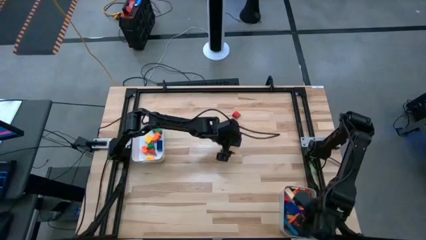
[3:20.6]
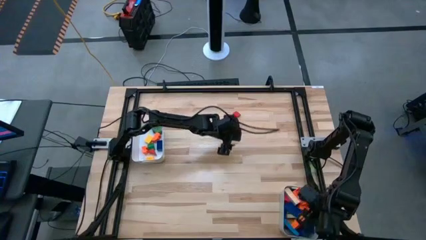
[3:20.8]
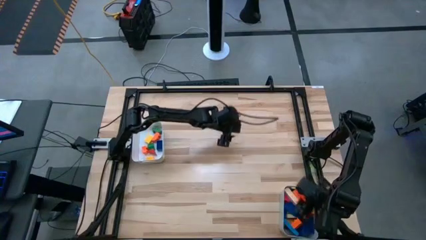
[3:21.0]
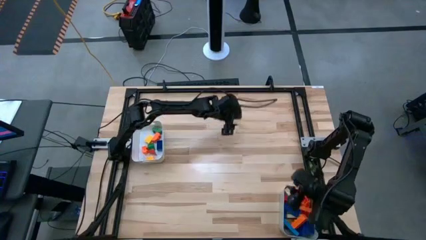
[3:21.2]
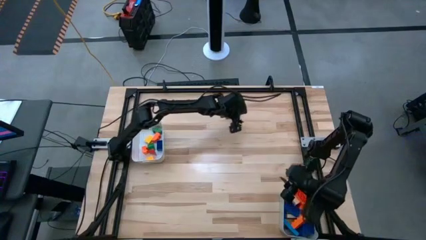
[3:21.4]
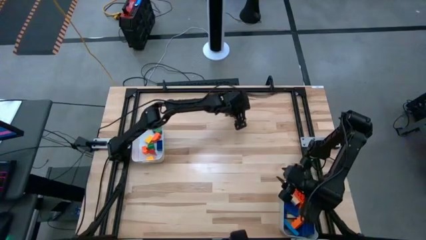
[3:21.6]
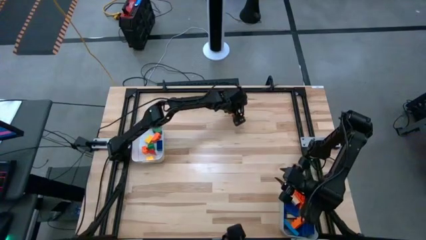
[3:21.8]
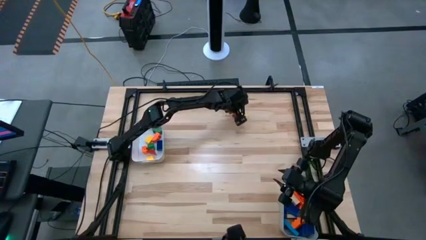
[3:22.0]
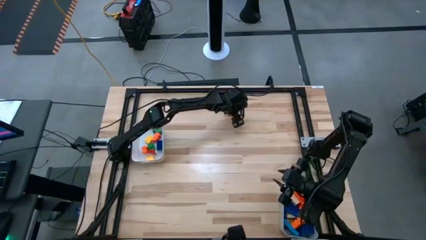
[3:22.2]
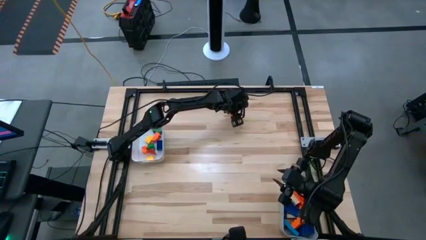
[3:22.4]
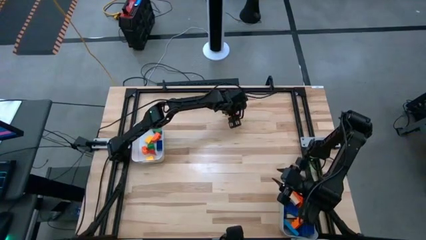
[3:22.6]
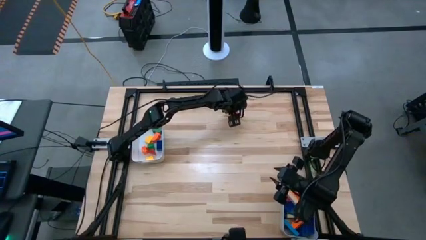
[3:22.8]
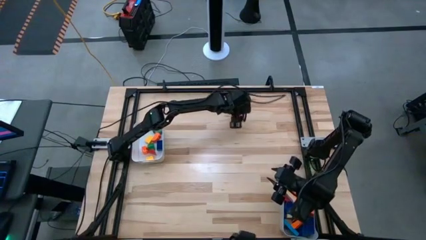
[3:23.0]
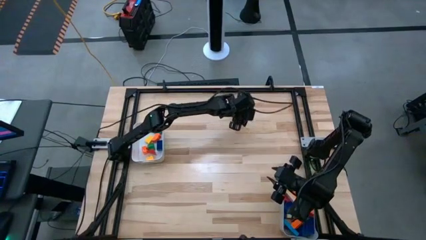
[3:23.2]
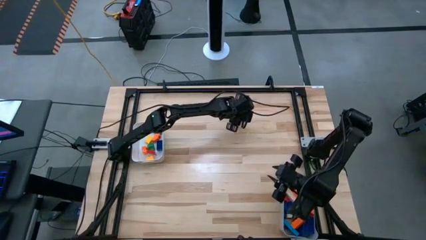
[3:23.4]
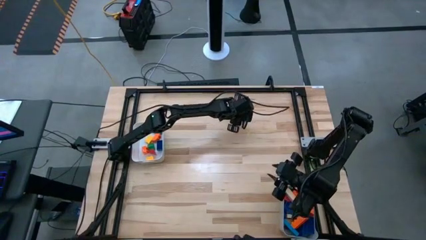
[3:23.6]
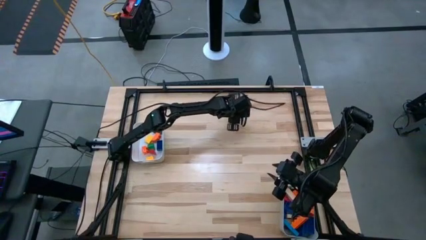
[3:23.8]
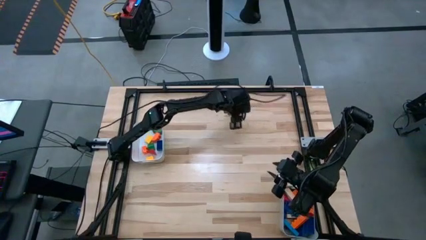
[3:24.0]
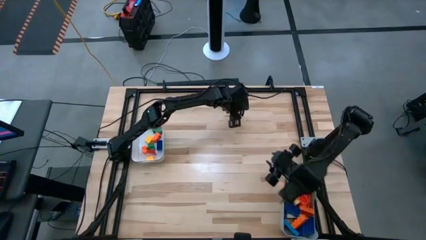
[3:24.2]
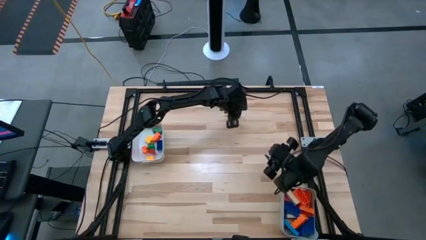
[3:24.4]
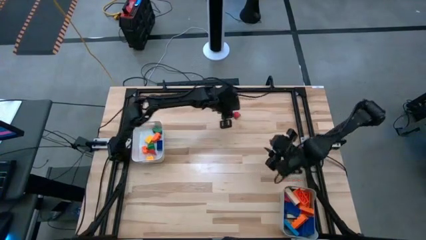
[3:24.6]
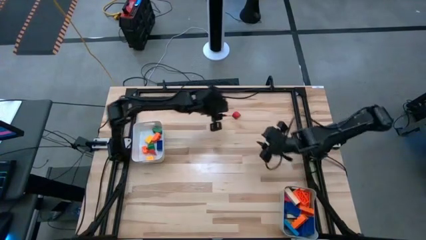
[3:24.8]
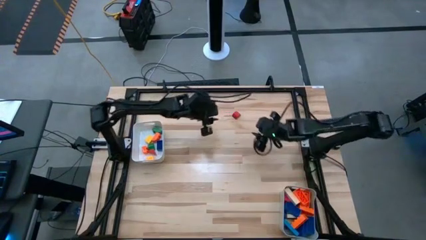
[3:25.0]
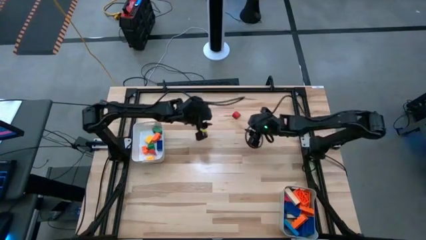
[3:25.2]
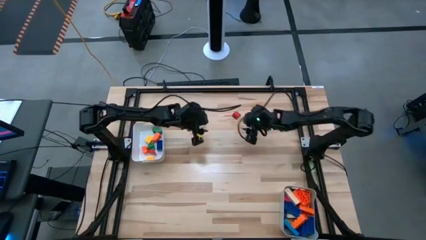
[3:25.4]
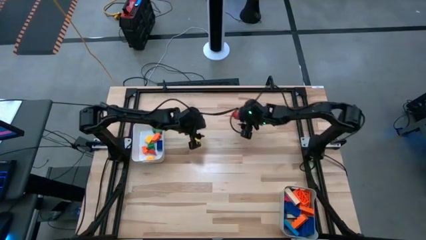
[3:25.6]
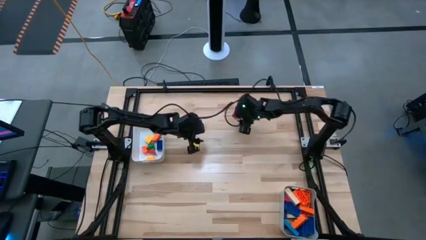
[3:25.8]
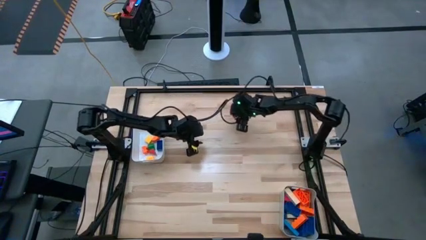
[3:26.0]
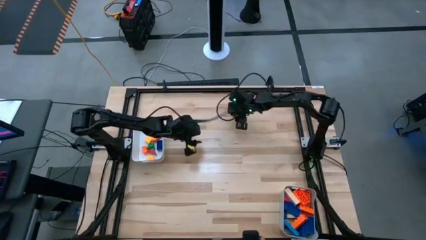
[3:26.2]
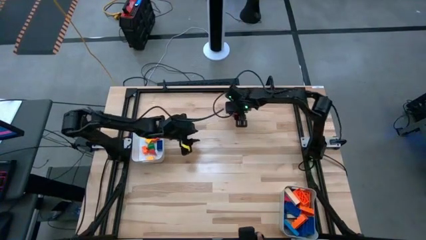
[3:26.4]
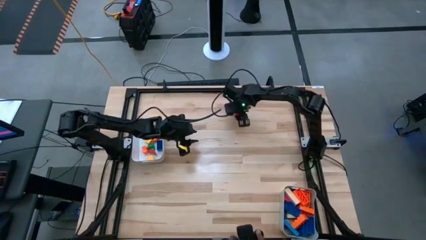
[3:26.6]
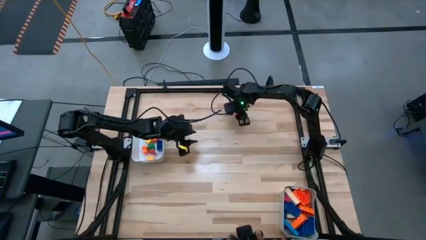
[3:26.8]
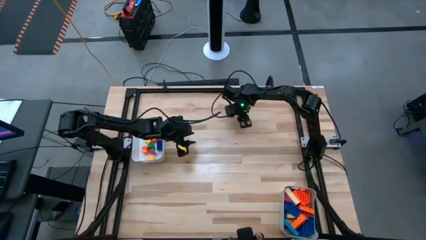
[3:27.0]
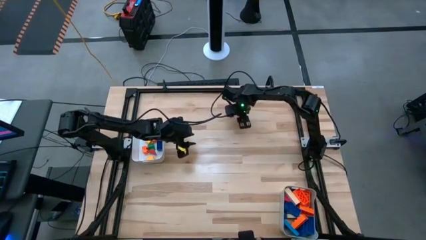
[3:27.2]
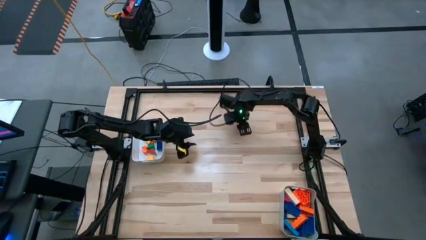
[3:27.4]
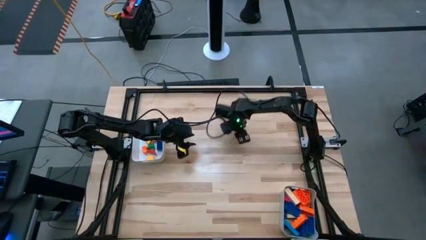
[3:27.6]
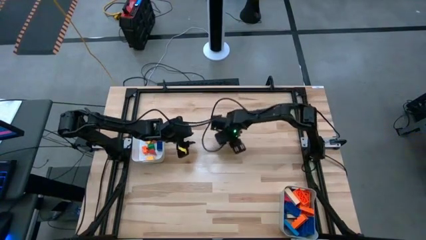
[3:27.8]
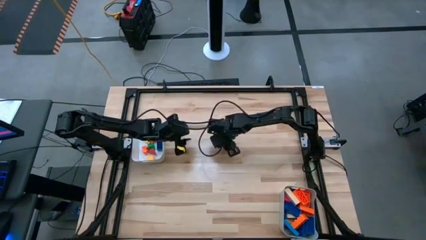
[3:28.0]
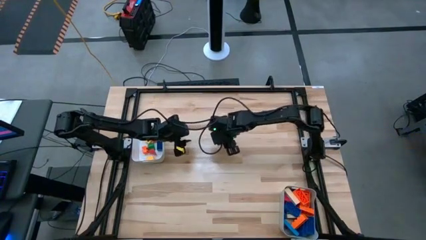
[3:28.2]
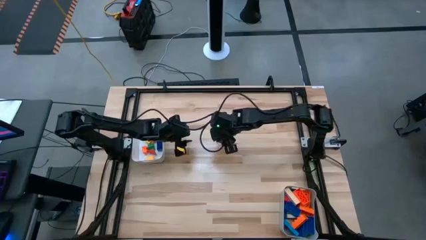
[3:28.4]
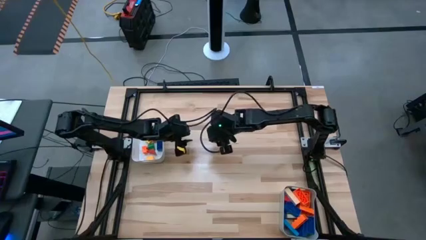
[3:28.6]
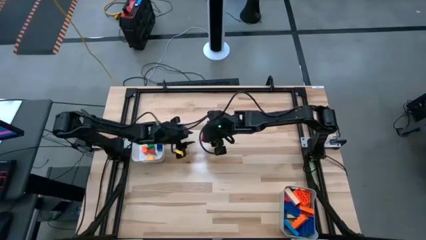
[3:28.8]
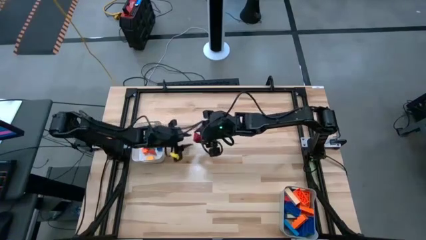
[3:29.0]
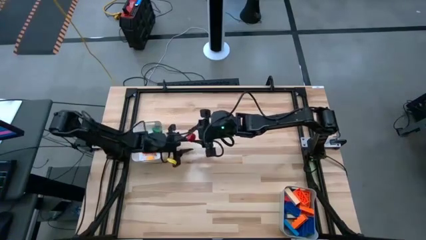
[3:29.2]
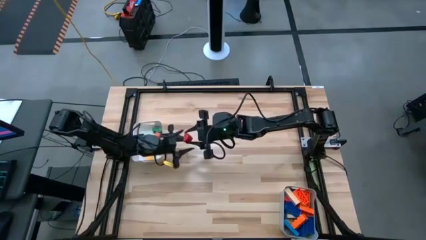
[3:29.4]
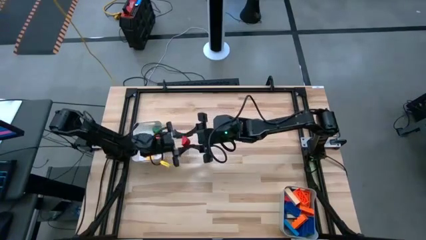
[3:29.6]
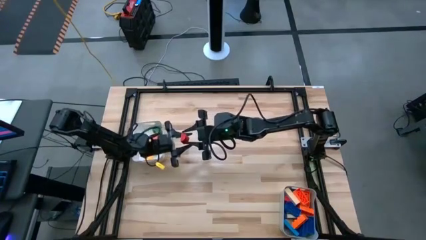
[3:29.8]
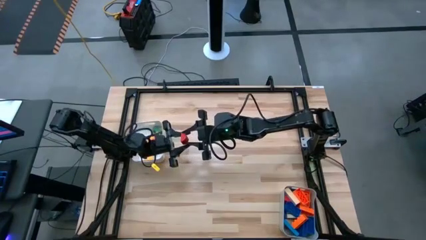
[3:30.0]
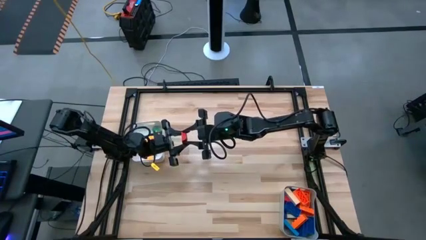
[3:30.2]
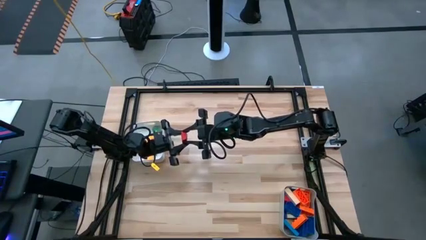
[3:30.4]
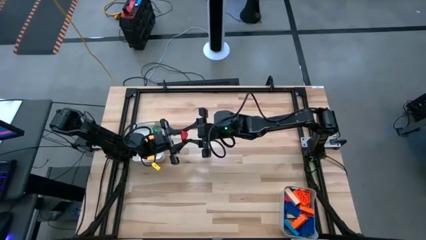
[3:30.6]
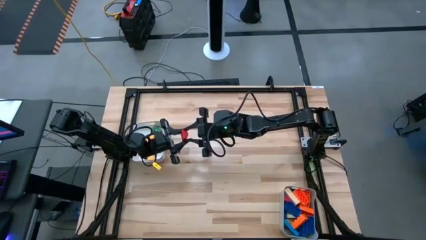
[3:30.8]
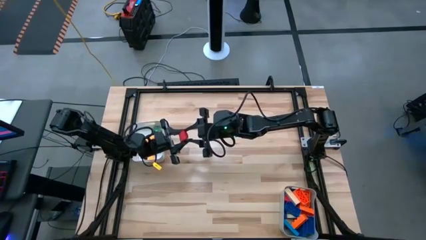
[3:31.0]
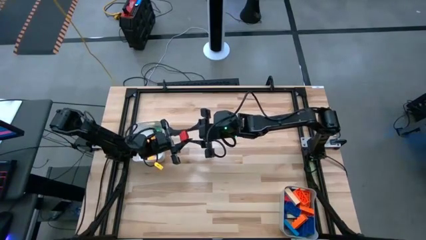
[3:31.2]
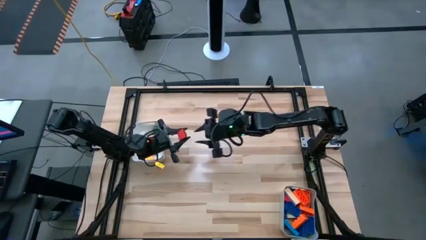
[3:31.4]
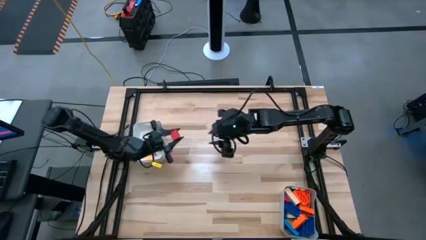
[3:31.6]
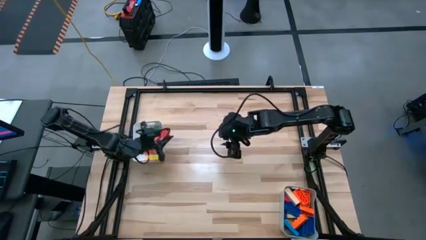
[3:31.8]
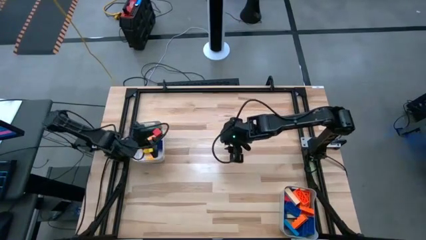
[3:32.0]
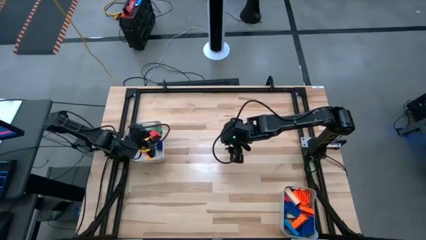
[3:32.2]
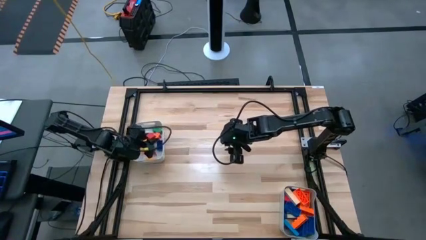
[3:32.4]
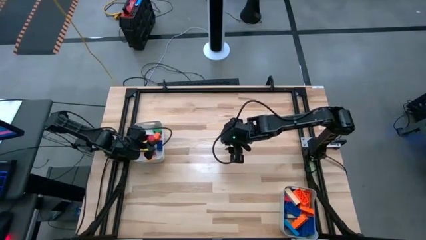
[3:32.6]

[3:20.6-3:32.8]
Task: Sort blocks by size
Put the red small block into the white bin

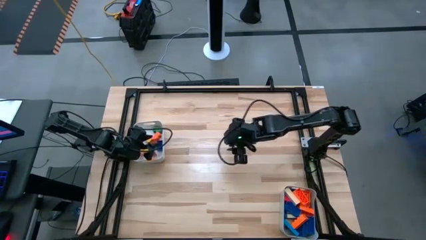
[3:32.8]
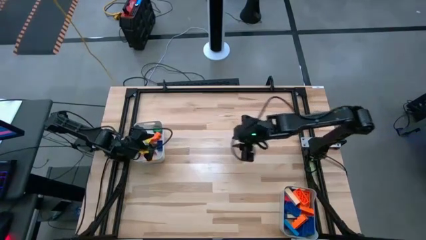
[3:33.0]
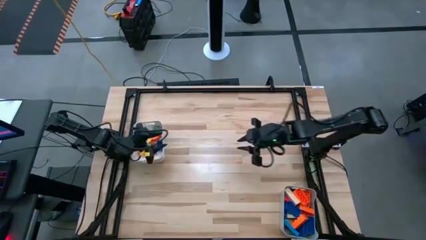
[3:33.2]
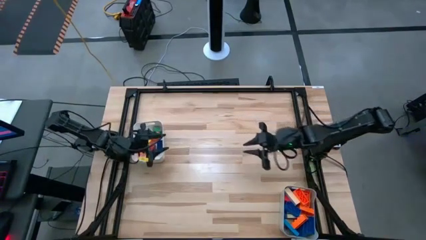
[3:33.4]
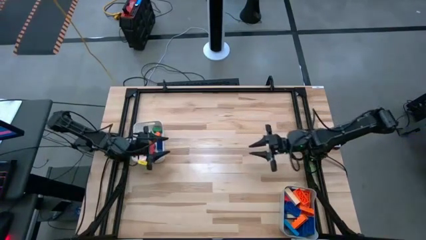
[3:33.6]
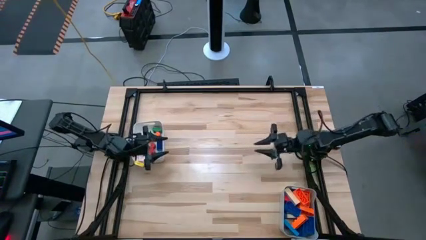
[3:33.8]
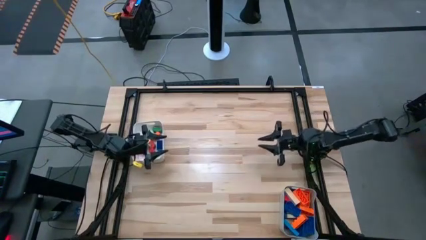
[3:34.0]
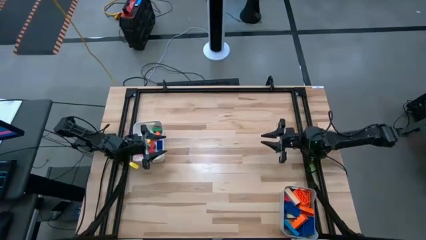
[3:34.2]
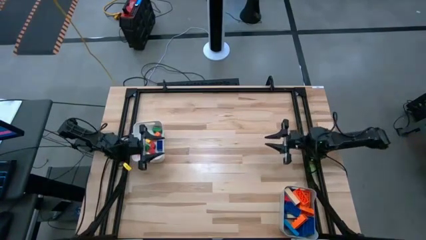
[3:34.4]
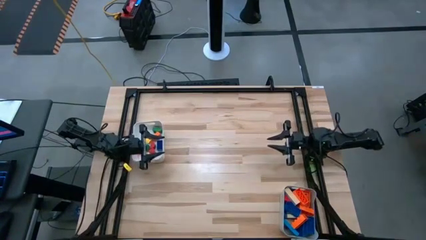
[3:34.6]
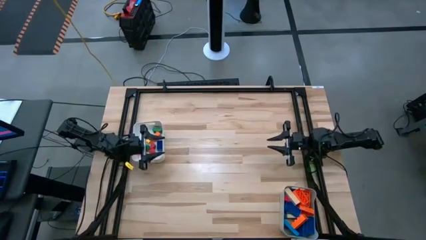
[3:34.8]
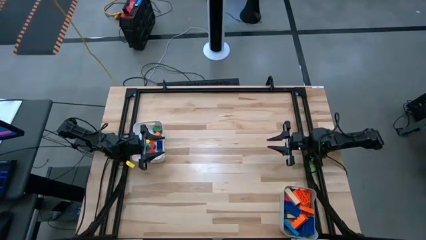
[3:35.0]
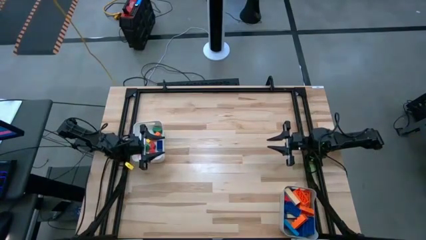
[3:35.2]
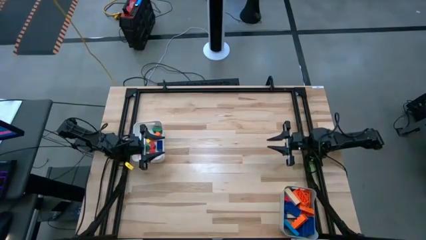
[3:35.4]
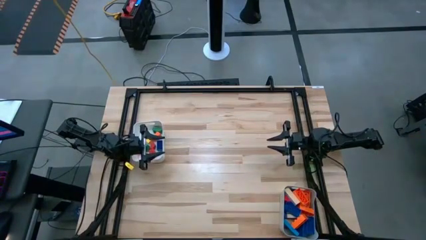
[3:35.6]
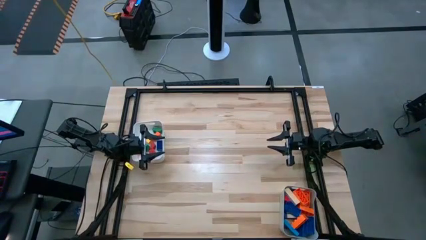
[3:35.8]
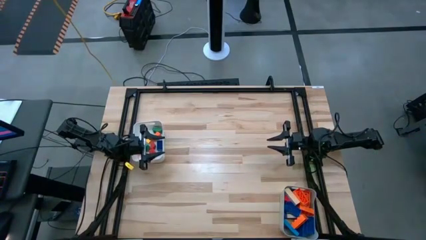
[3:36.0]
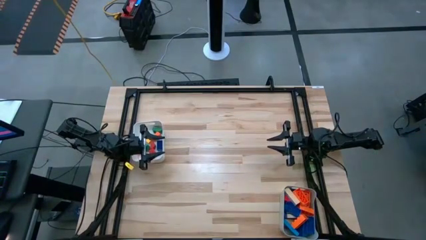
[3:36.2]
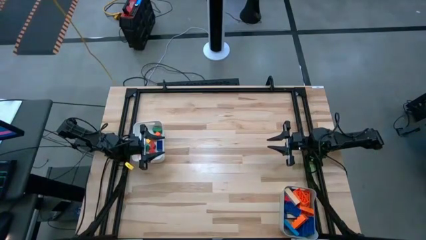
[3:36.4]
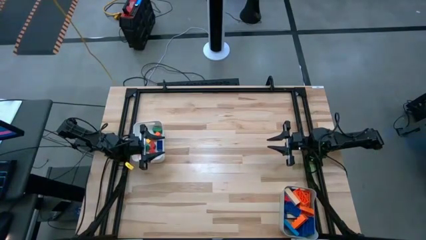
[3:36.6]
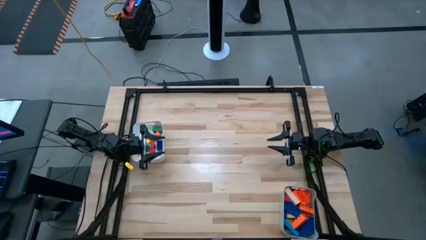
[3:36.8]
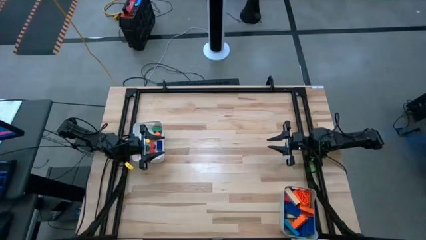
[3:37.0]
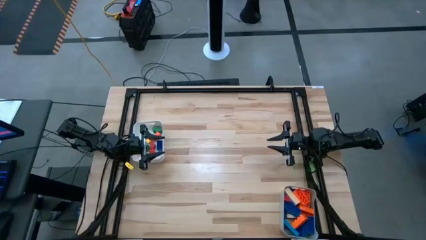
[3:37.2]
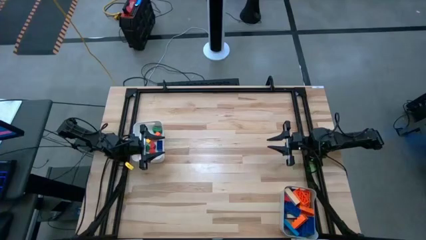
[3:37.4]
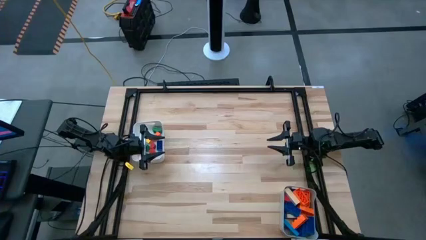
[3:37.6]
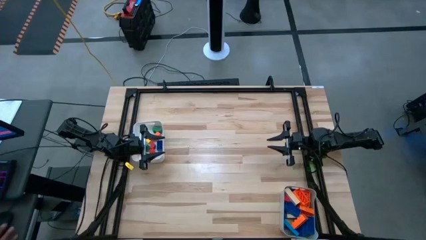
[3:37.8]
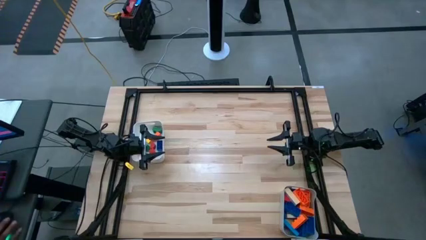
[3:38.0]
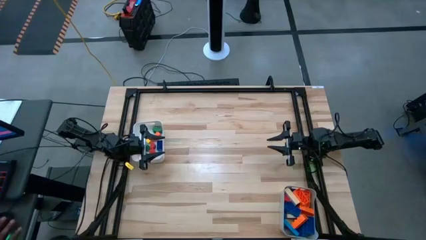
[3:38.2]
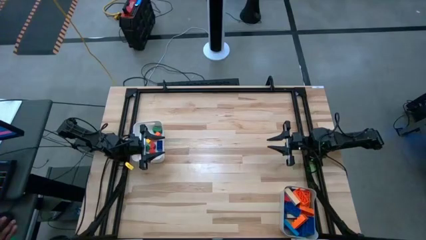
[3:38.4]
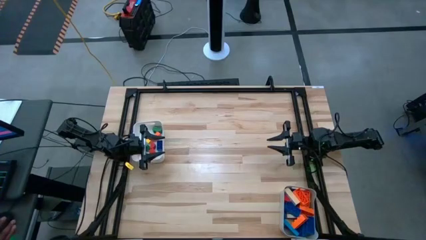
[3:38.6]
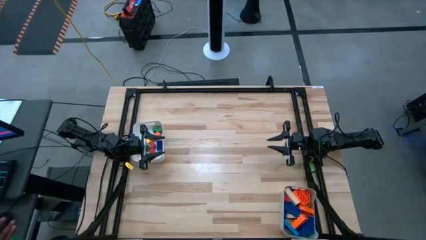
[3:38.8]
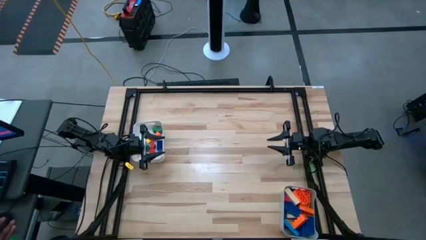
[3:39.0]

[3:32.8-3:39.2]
Return to Home Position
